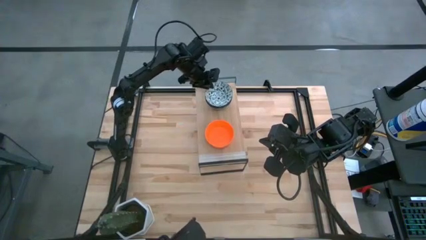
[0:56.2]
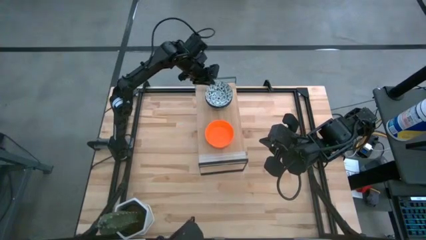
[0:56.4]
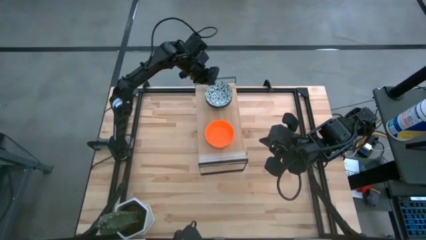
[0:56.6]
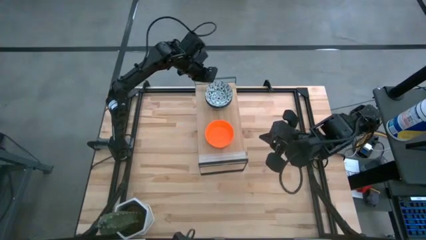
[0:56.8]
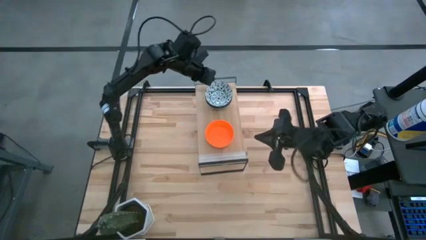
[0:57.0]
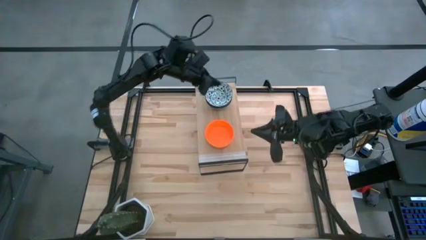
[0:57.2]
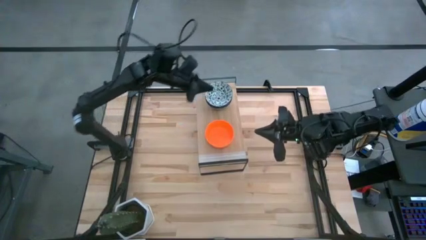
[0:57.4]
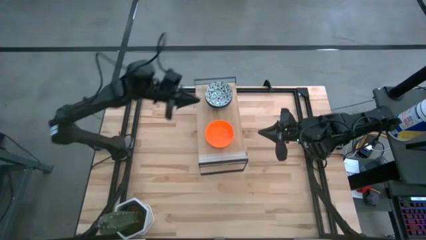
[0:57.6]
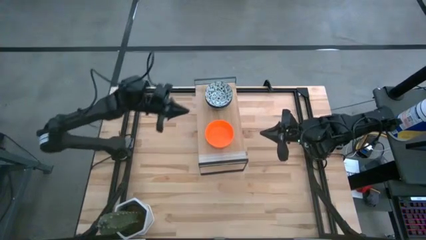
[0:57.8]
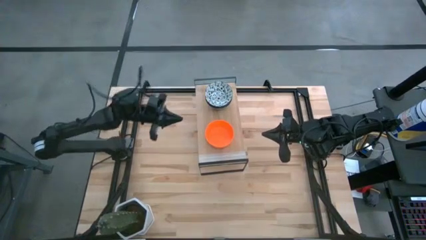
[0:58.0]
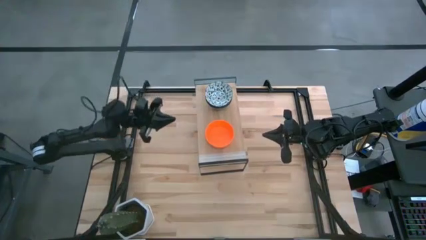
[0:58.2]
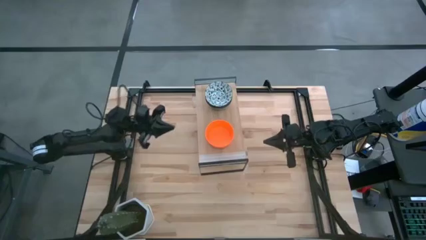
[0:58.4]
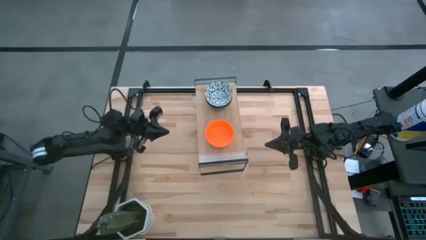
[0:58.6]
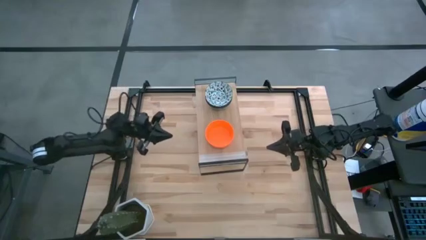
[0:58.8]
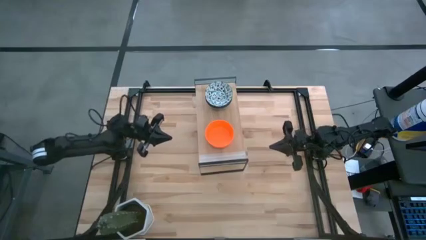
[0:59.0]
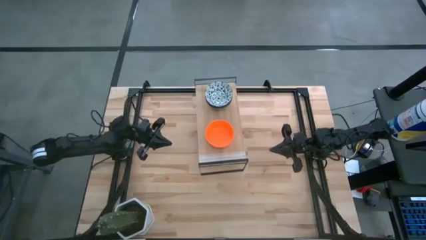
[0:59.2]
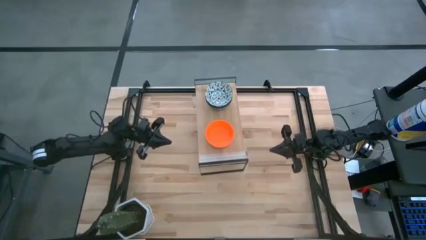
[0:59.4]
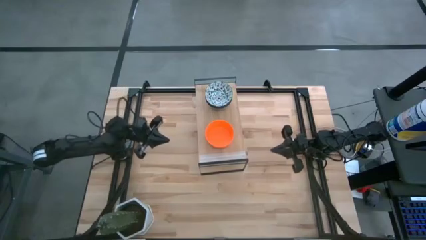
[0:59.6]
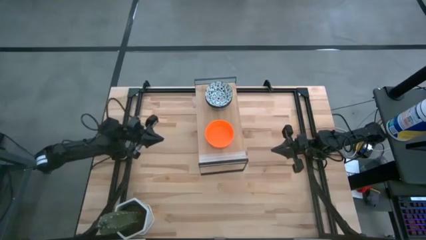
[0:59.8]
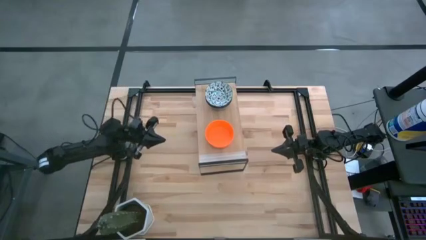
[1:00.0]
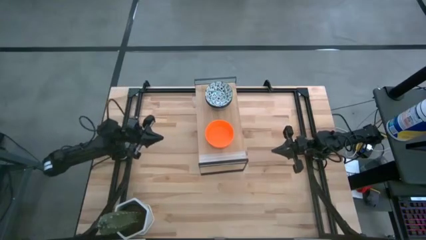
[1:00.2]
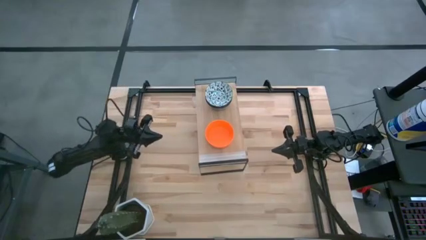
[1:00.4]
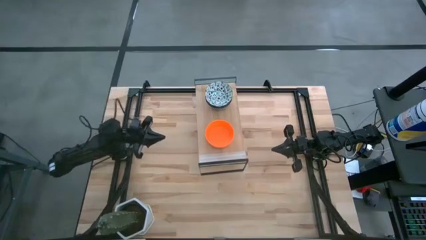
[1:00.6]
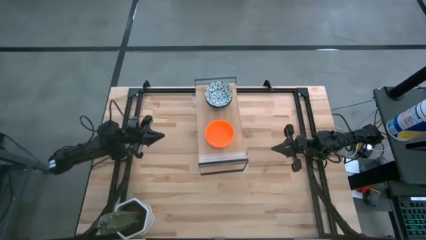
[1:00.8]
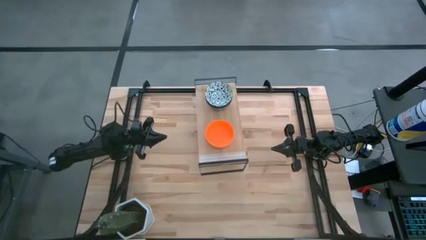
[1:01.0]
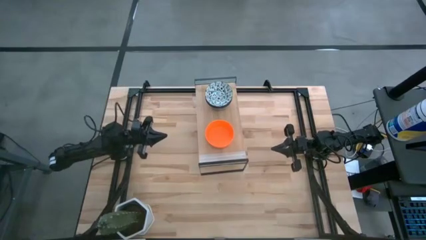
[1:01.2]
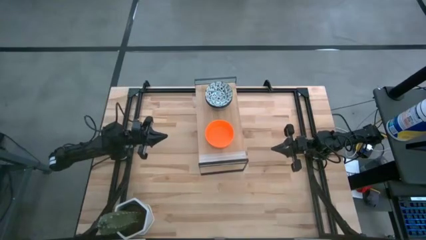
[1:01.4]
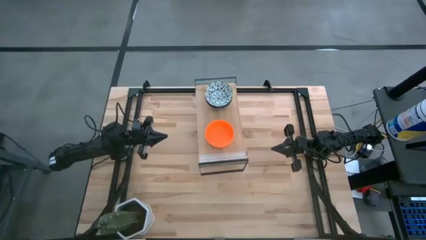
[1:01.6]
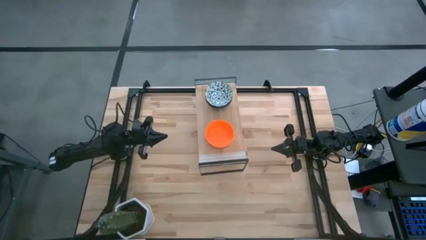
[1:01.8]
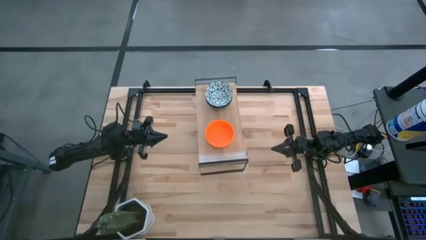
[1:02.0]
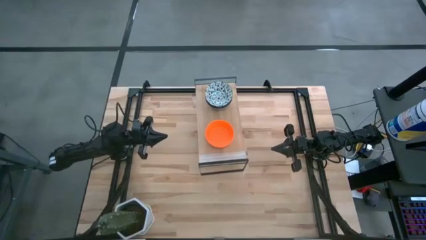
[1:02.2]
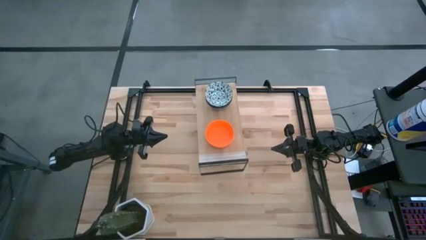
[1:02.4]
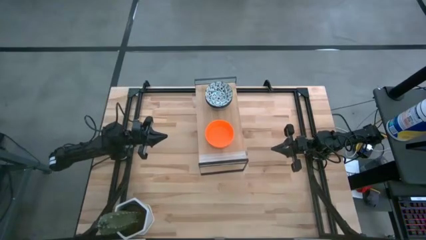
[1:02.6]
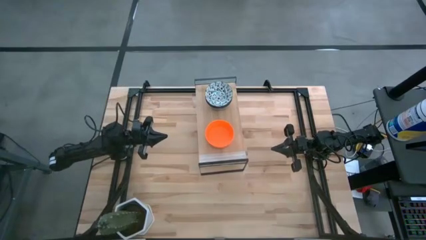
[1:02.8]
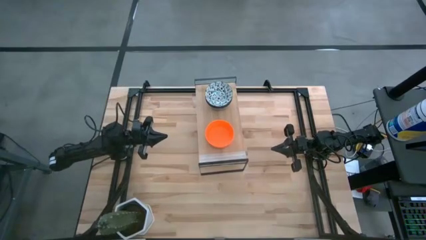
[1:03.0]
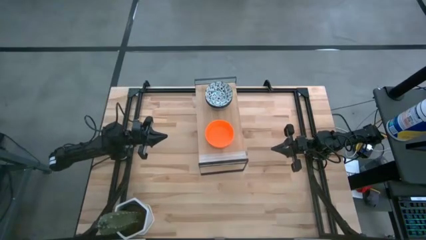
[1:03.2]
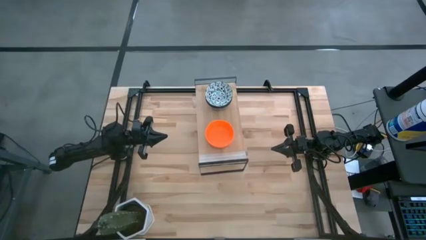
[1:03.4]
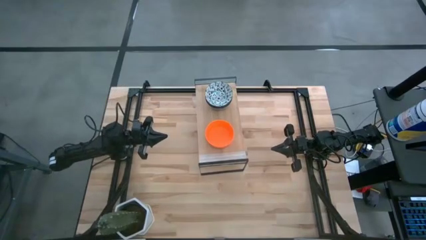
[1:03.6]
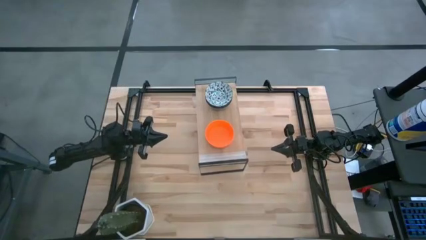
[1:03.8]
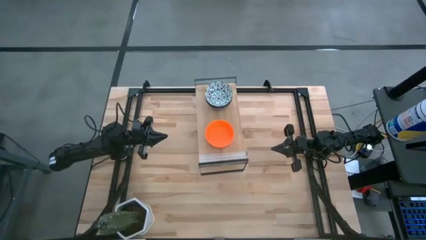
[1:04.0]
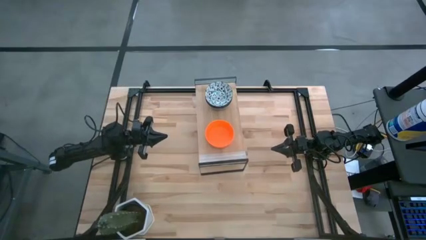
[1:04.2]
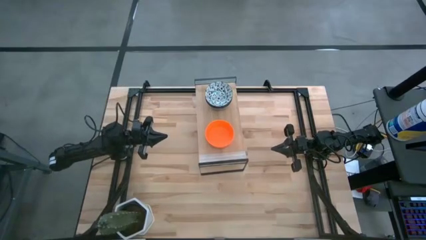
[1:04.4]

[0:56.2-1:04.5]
Task: Pick & Place Mini bowls
Return to Home Position

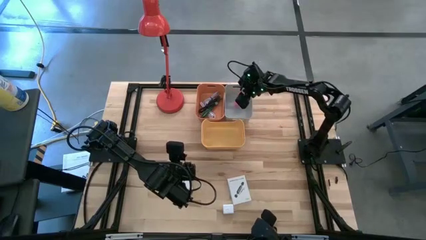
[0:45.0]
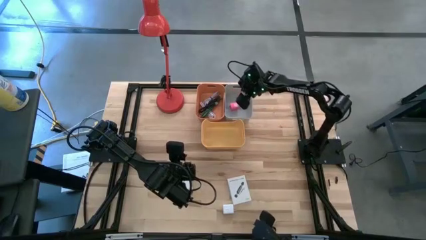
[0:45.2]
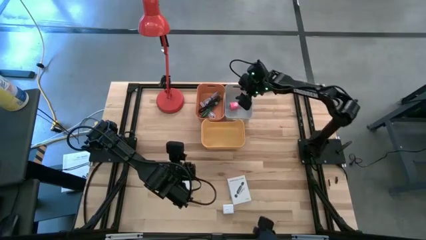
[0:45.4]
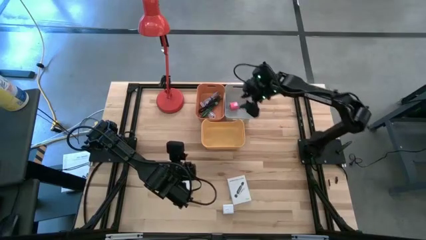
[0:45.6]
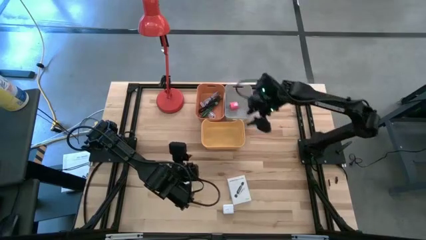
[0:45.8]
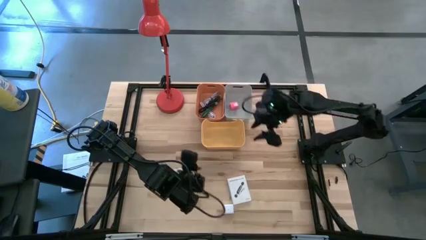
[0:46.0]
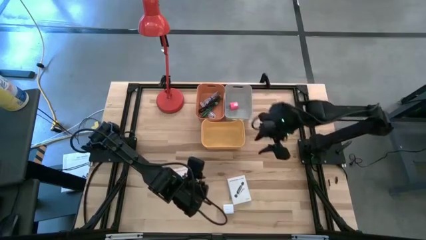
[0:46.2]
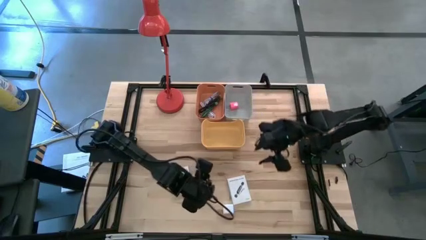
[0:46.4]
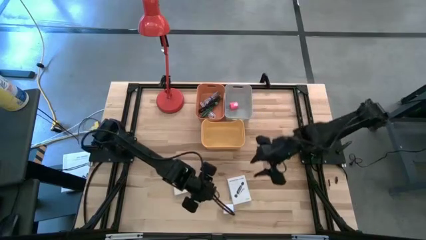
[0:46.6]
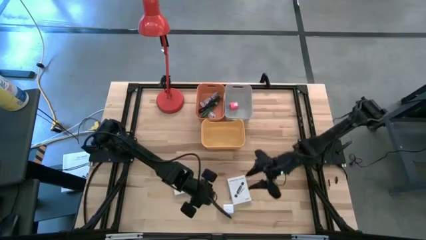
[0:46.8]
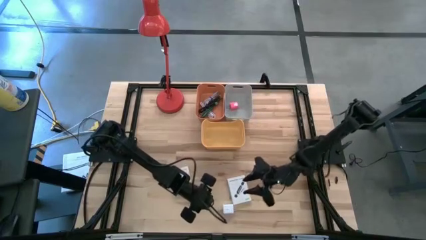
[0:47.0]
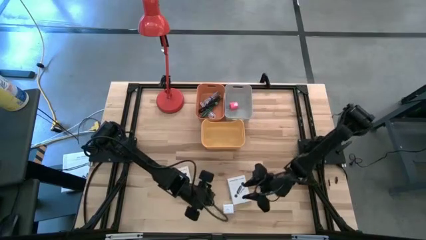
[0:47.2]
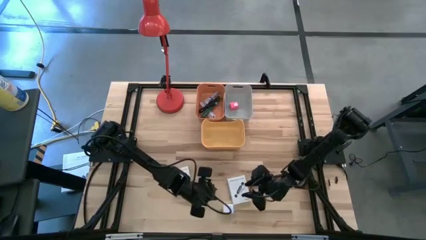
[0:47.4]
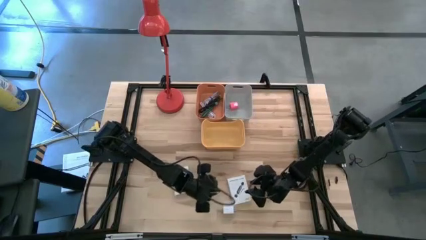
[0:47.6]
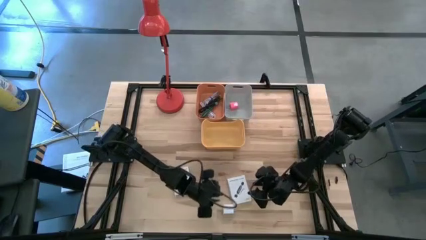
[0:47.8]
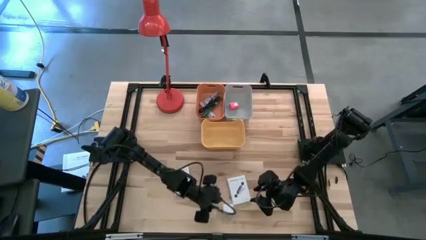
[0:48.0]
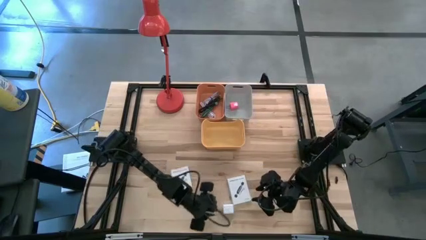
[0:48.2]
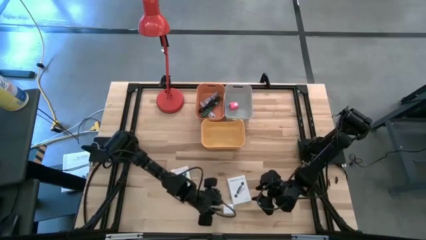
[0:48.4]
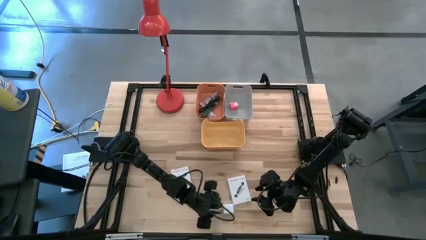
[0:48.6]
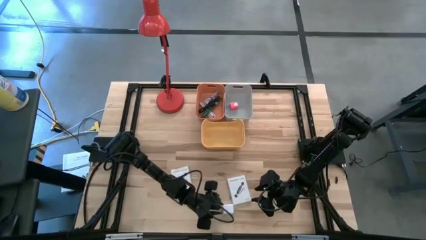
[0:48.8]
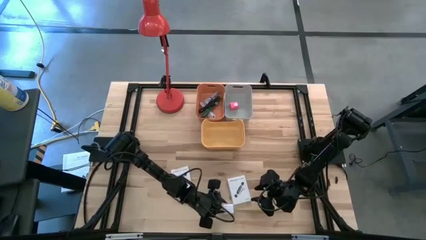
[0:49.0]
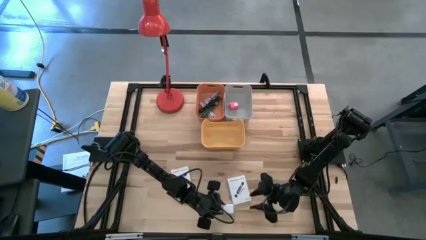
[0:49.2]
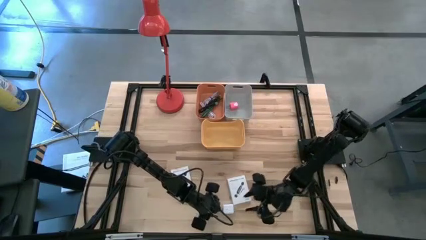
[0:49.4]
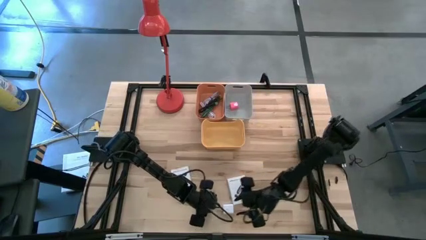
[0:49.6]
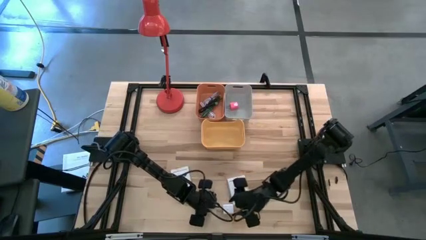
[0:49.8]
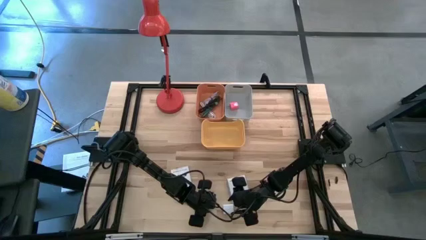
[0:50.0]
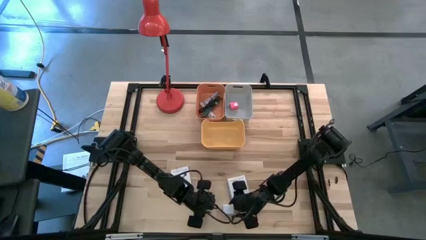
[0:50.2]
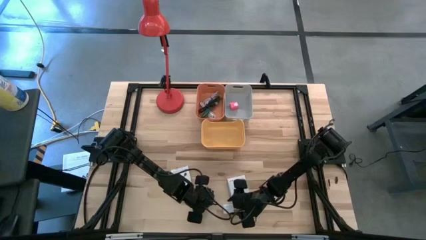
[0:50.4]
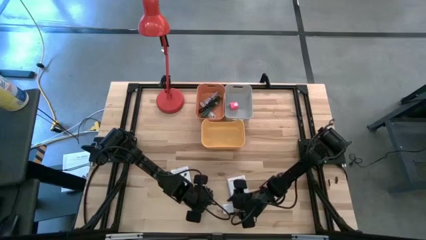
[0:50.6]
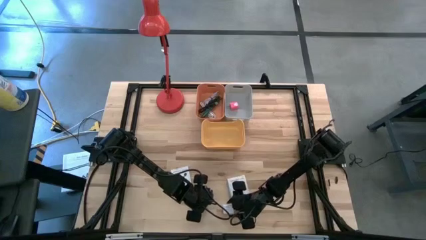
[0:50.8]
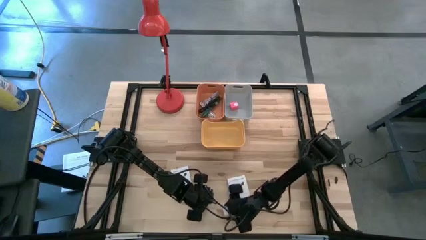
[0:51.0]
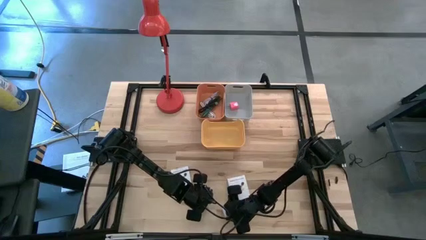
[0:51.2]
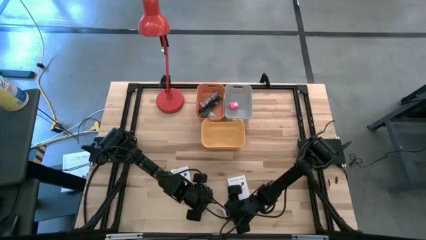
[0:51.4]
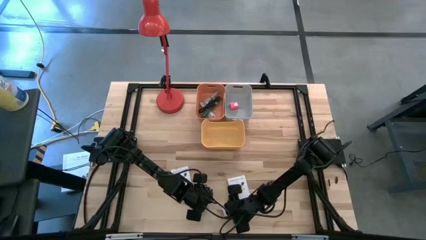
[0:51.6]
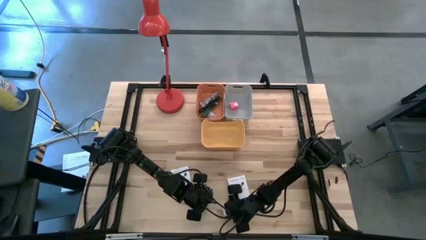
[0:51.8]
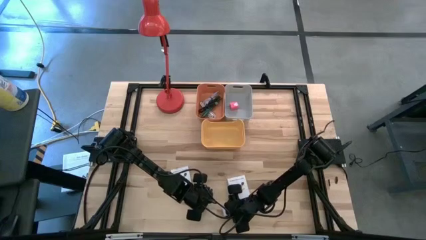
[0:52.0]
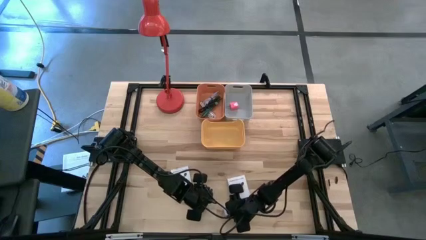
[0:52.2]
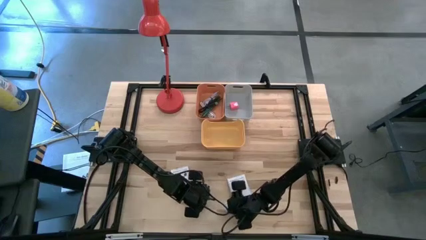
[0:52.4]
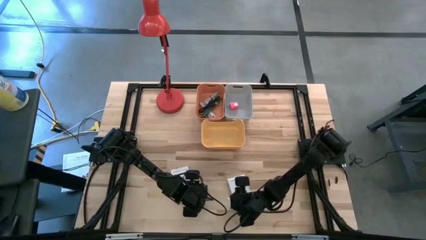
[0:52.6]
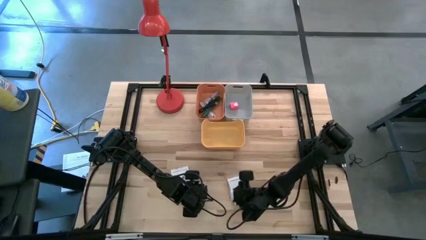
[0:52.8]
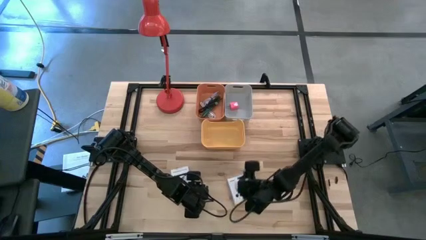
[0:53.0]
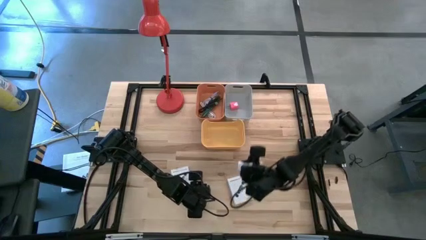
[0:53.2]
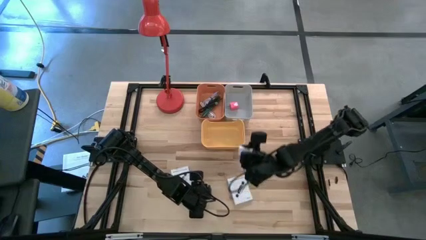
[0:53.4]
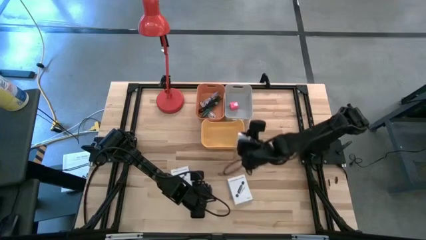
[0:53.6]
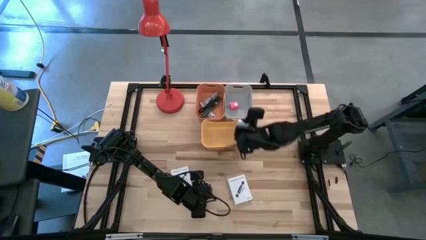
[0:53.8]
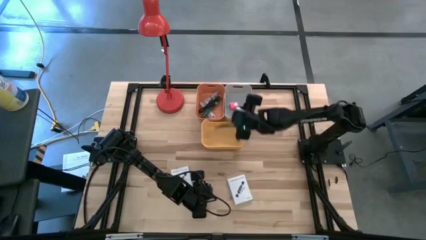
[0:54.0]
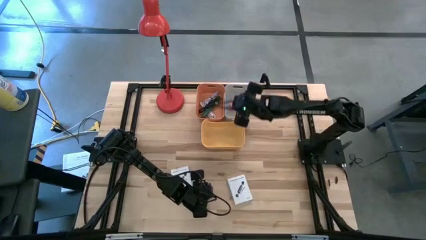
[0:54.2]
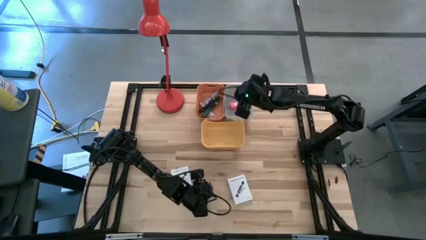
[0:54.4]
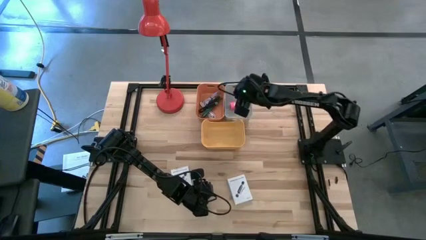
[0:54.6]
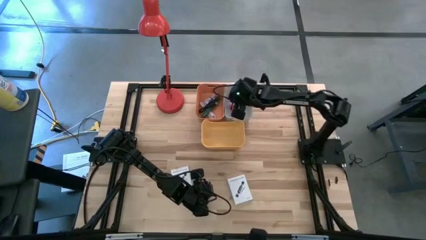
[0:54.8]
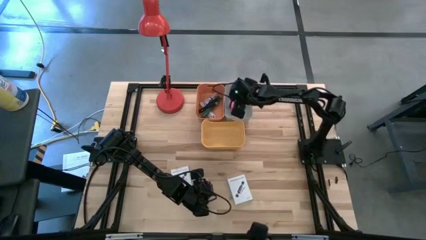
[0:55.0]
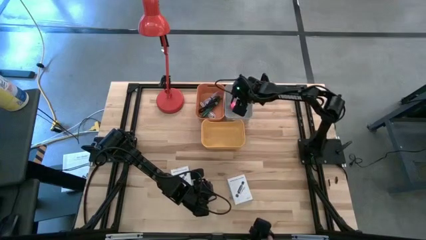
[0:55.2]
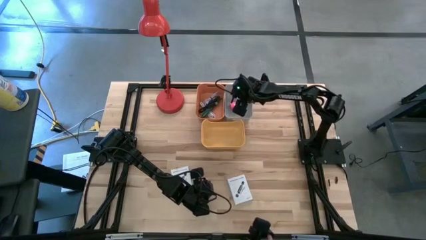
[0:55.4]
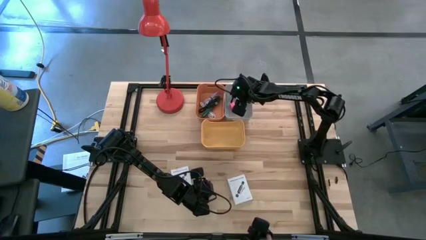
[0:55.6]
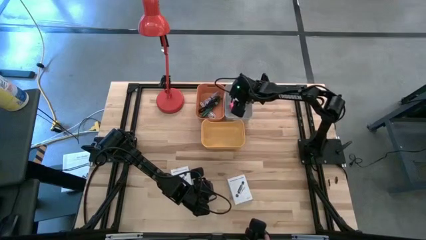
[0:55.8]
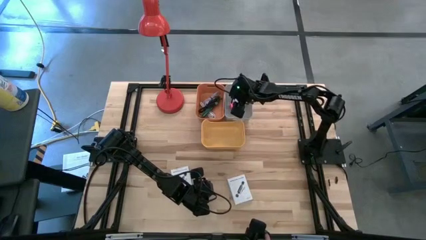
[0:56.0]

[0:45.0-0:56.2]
Task: Pick and place items into bin
Put the white charger adapter into the gray bin
